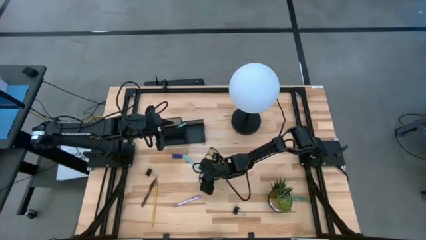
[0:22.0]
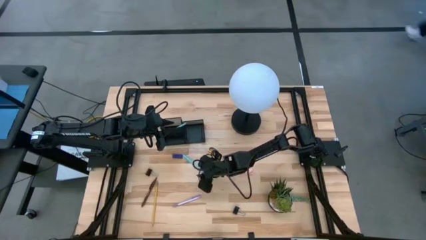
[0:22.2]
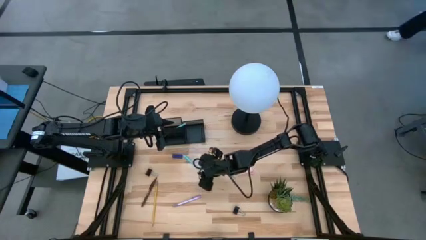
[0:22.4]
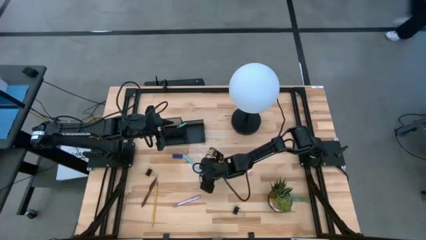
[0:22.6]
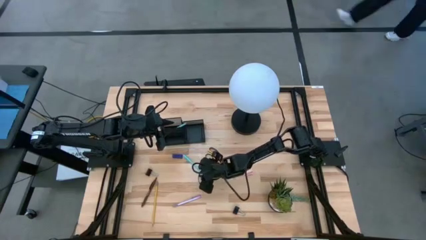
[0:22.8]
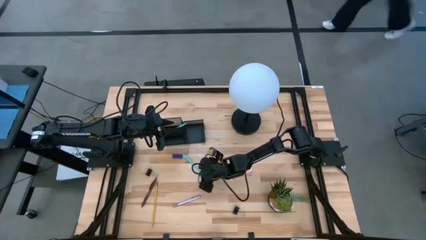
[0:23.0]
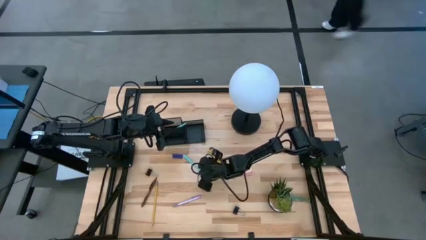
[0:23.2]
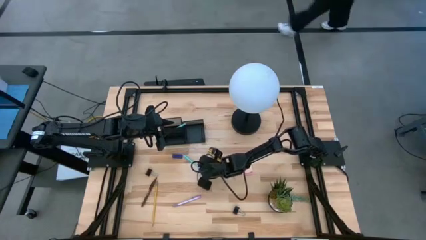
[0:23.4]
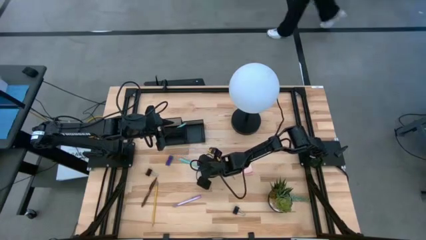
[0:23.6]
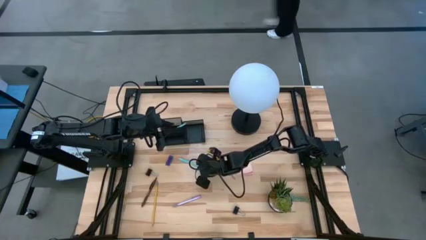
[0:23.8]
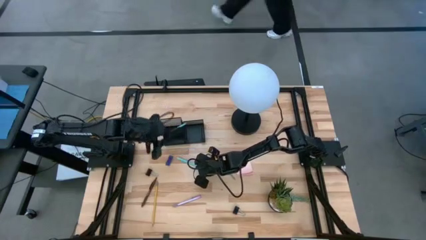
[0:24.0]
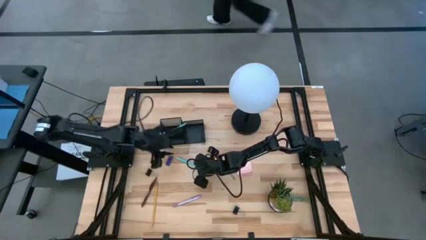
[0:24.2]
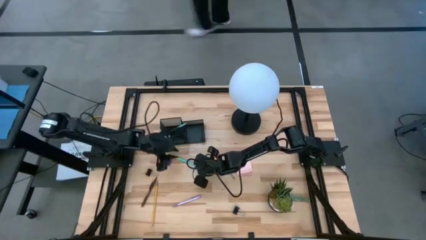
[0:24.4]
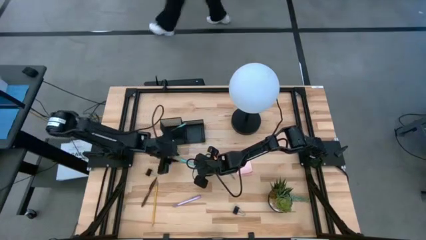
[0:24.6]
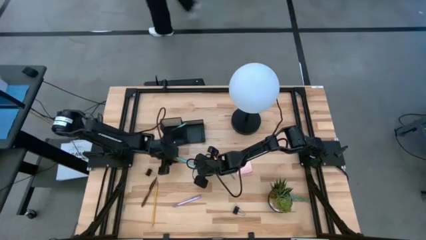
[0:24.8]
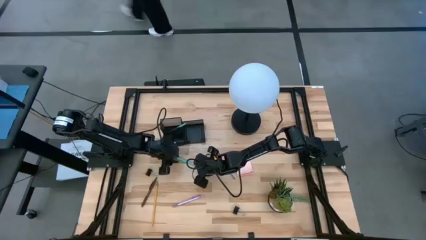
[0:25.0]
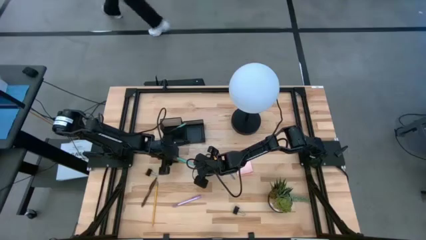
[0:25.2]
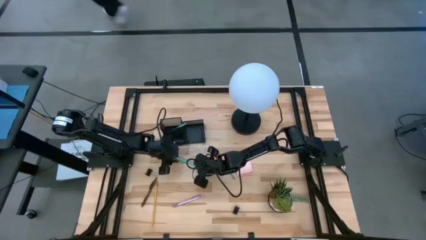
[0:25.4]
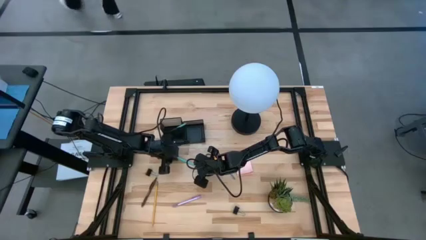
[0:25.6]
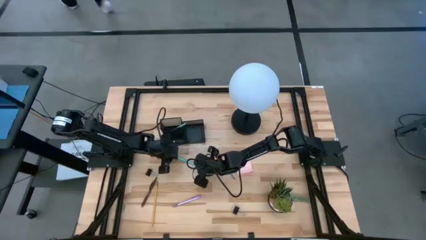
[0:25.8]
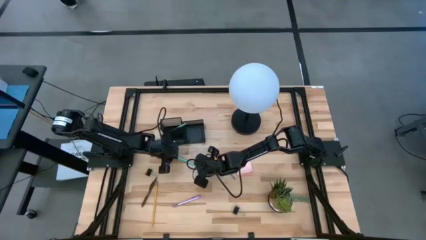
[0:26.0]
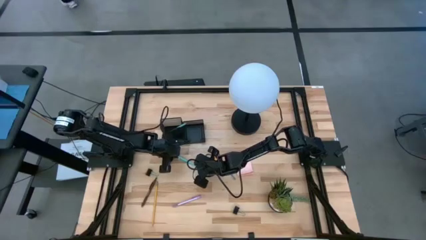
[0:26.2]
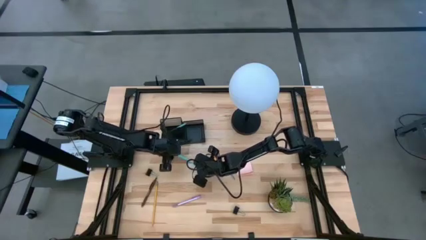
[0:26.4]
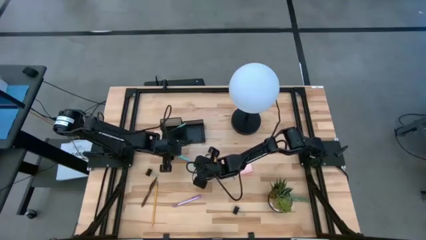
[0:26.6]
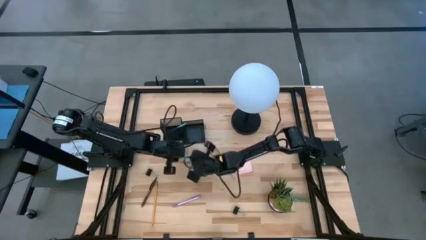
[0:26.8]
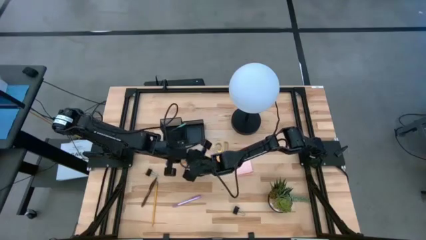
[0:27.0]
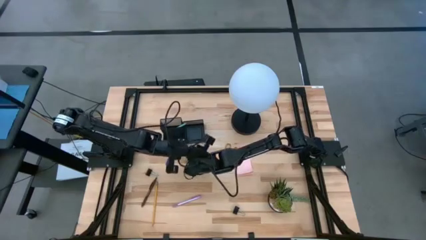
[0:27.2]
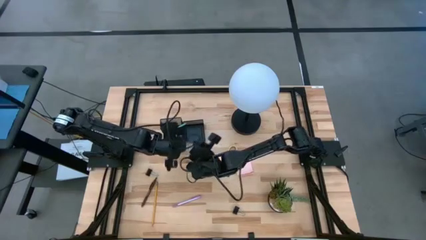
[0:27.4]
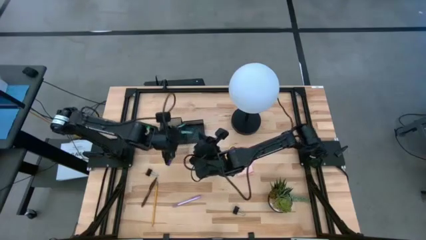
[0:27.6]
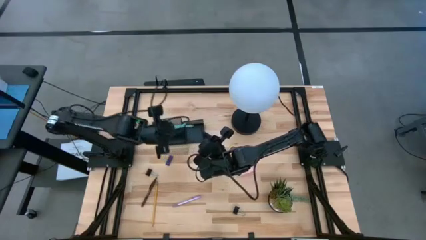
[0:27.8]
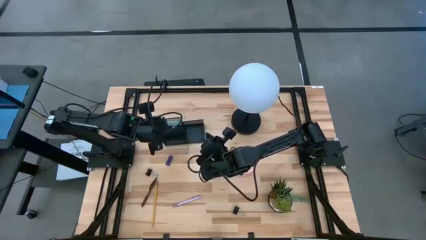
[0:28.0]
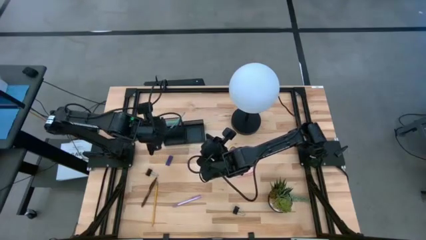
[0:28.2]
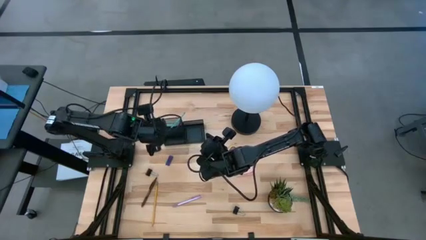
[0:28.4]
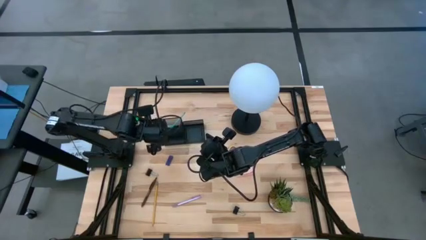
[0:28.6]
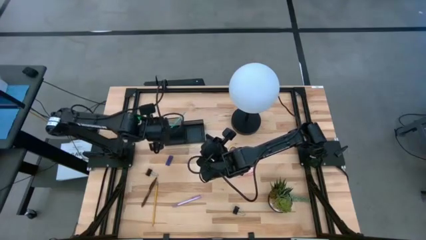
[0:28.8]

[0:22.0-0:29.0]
Task: Pick and place office supplies into organizer
Put the blue pen into the black desk organizer

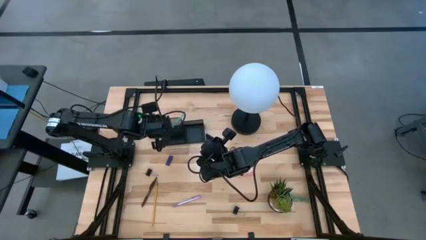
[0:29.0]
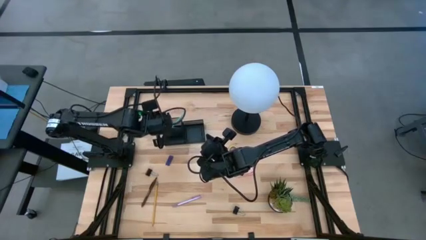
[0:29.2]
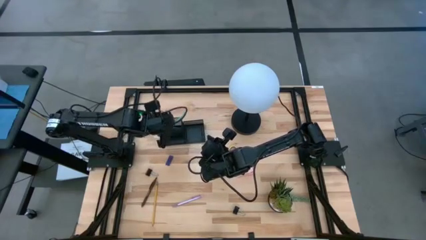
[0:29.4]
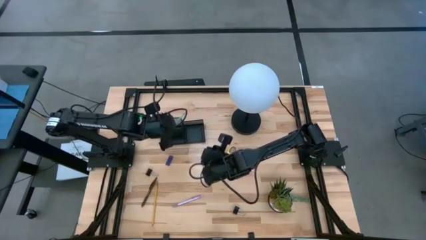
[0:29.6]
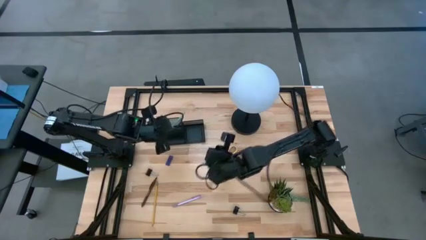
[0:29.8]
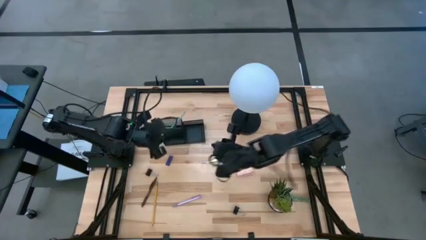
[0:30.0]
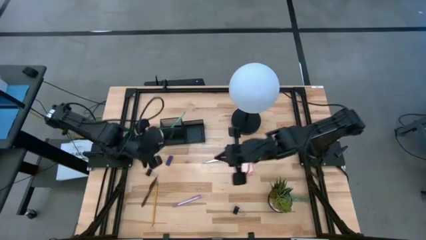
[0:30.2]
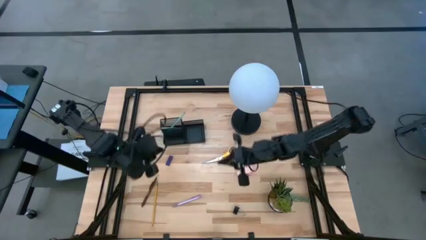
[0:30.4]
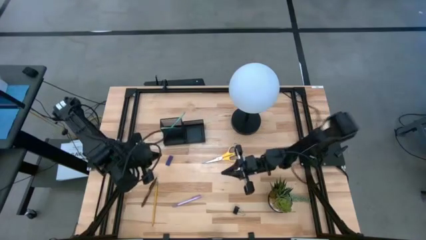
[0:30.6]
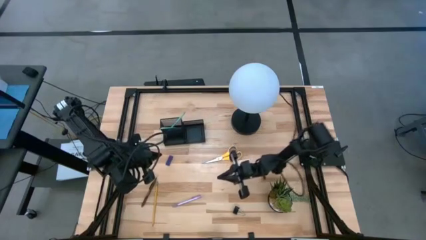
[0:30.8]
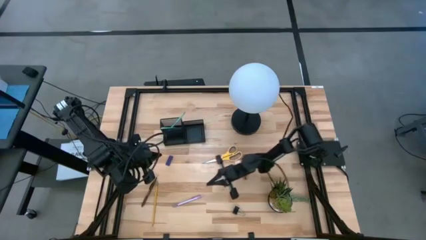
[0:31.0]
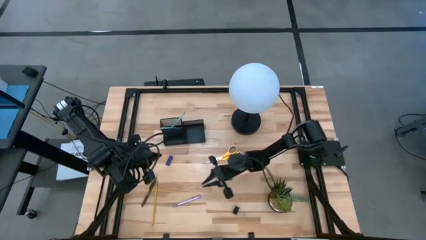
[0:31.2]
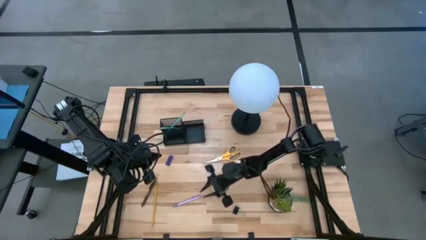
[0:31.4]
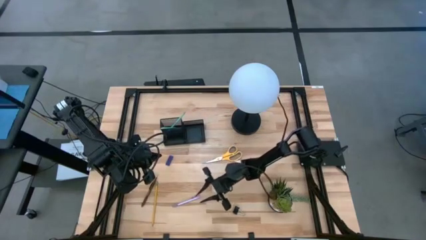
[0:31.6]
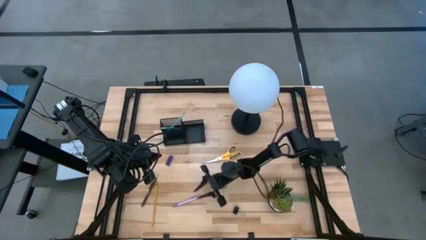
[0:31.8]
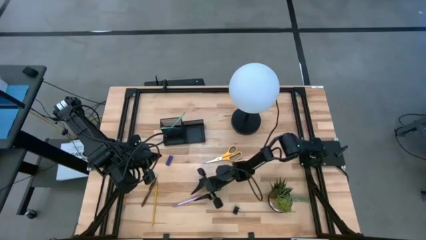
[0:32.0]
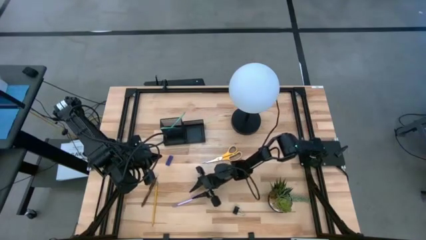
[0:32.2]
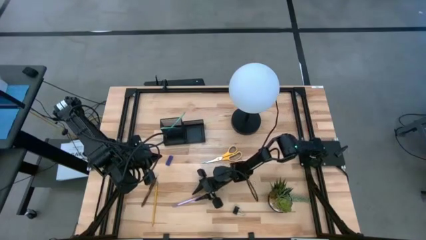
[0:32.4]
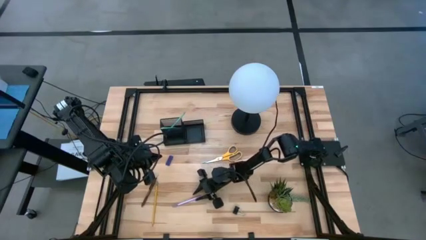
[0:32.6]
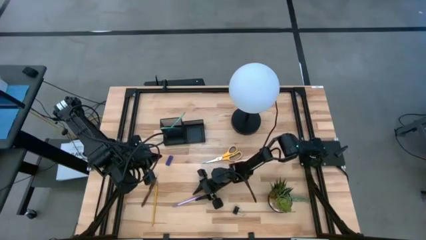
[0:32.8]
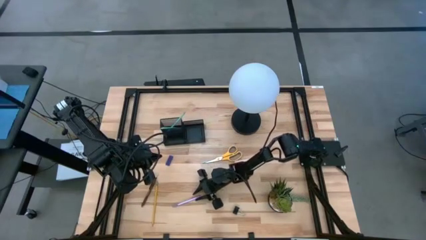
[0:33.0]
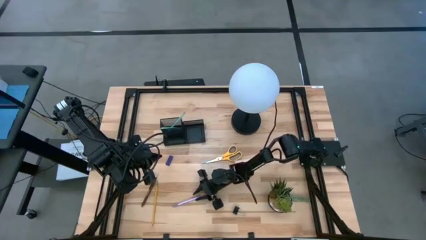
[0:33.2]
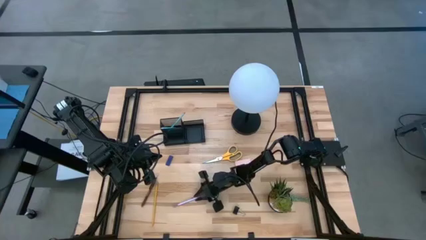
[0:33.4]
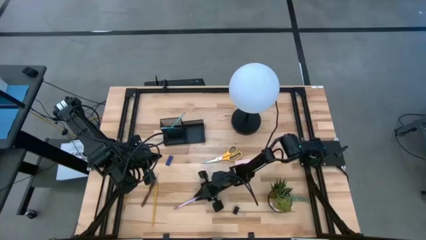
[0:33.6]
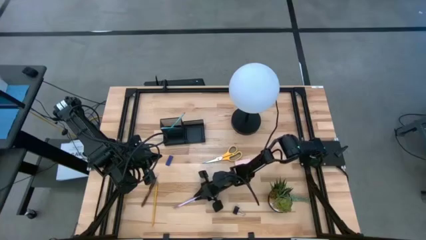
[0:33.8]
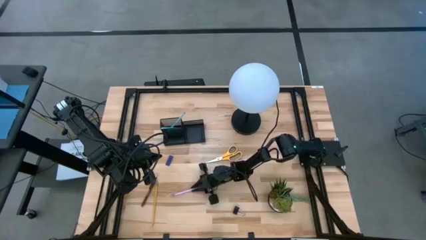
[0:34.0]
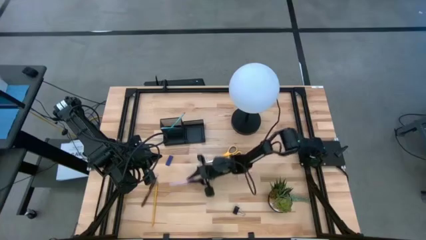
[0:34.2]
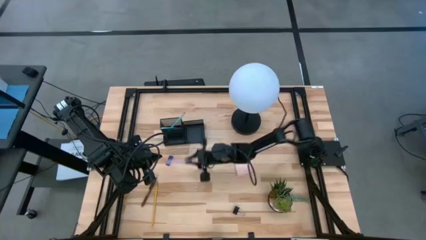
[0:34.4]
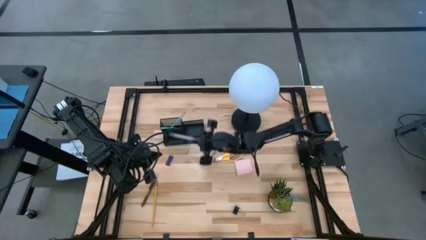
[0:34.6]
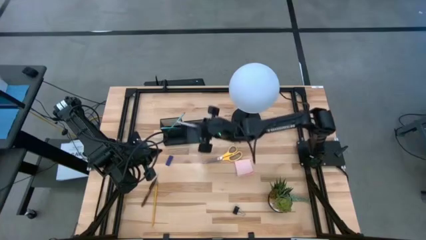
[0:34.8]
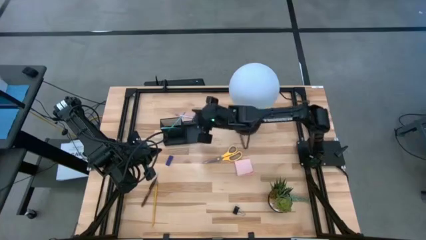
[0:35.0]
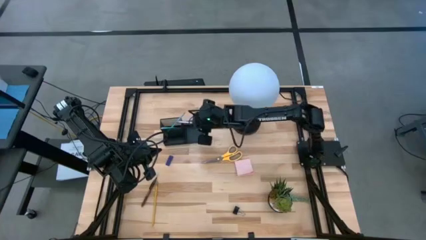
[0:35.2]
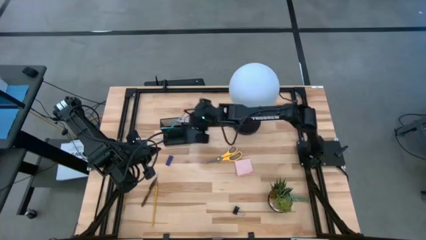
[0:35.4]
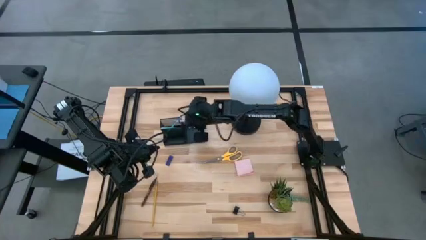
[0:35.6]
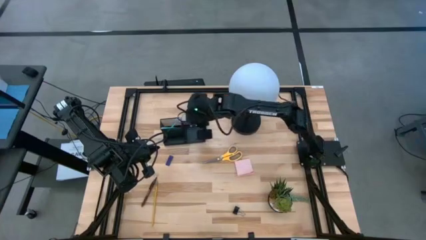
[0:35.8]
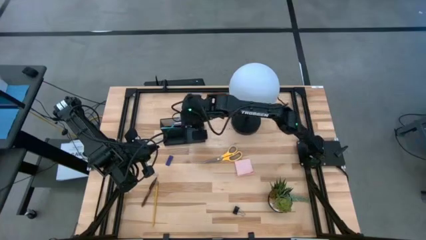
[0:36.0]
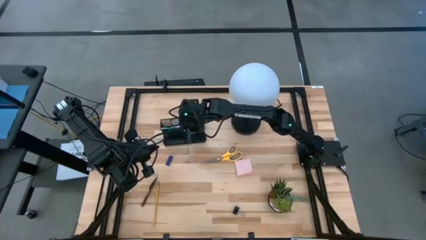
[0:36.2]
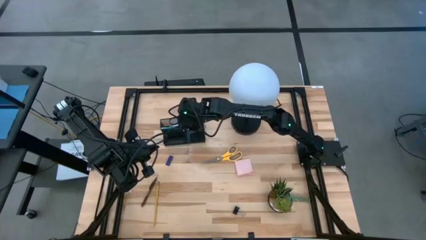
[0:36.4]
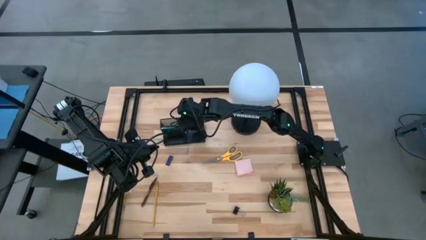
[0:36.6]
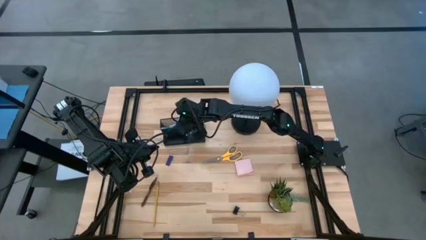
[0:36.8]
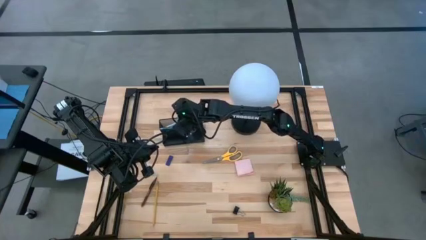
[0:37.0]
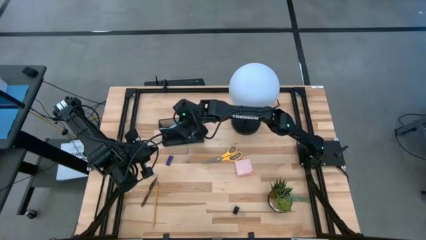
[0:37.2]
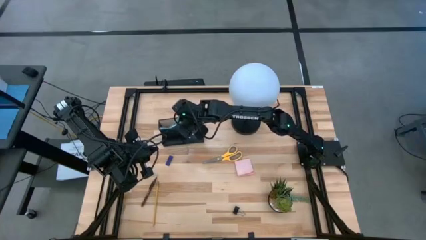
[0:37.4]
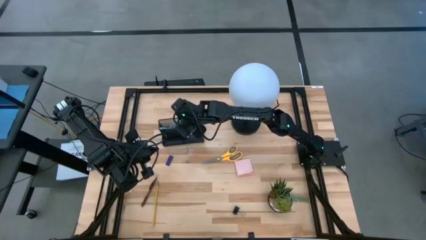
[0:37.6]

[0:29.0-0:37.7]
Put the purple pen into the black desk organizer
